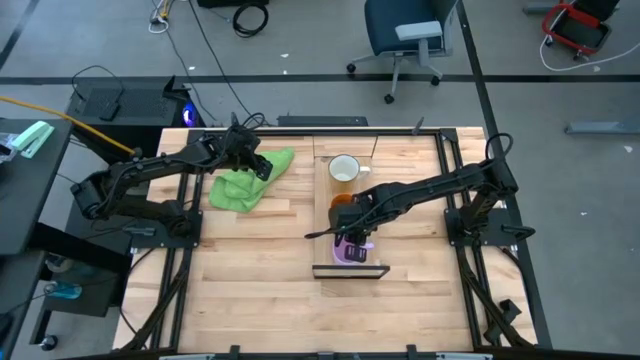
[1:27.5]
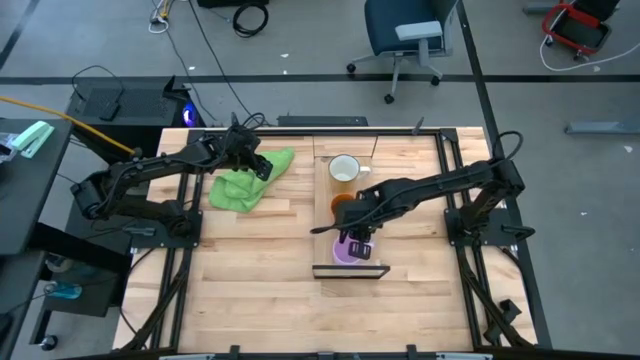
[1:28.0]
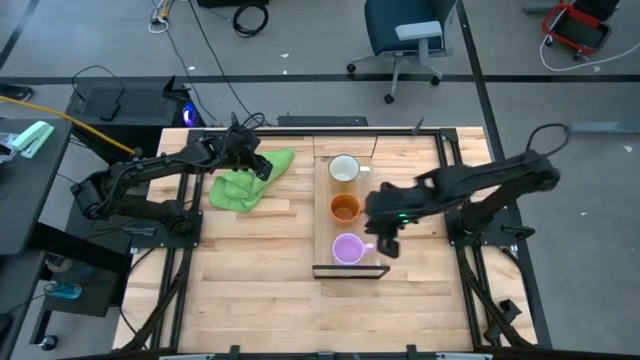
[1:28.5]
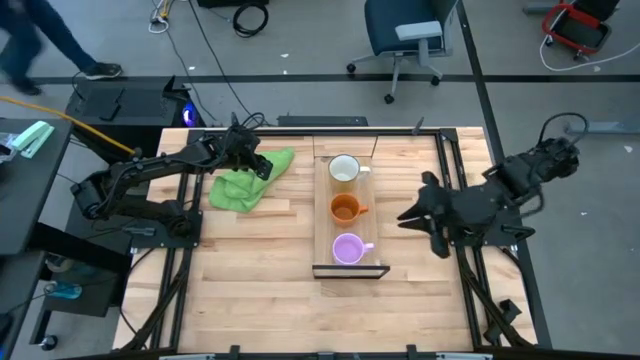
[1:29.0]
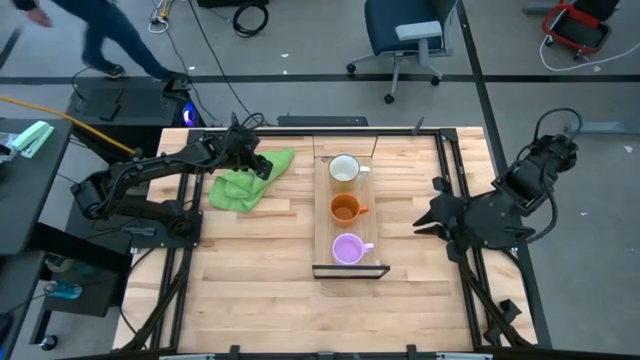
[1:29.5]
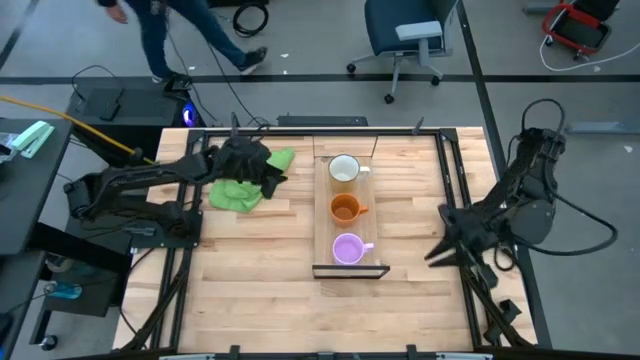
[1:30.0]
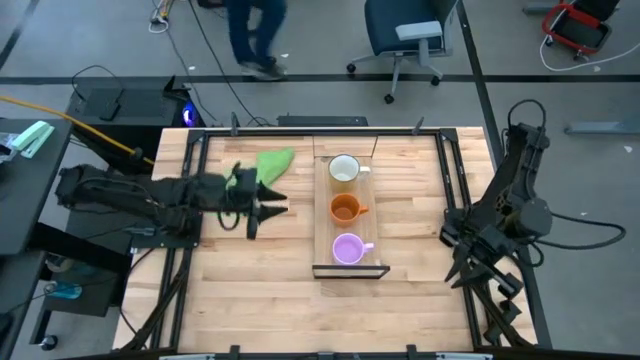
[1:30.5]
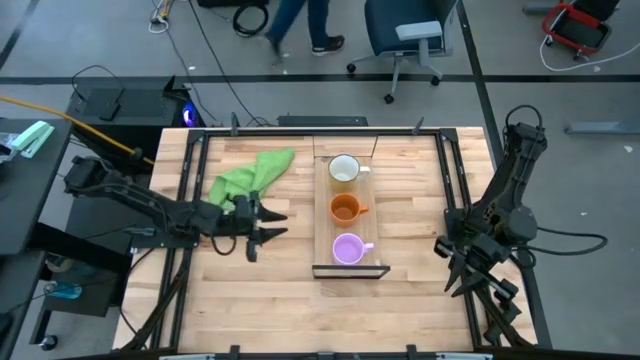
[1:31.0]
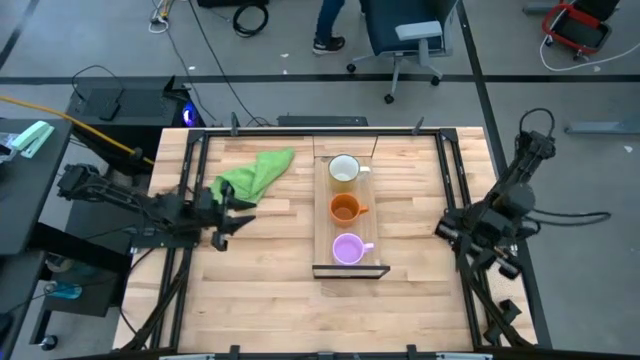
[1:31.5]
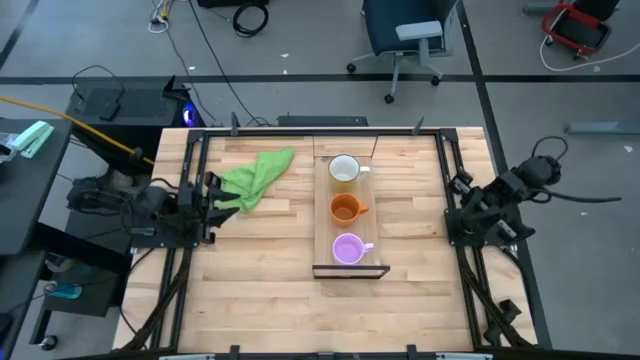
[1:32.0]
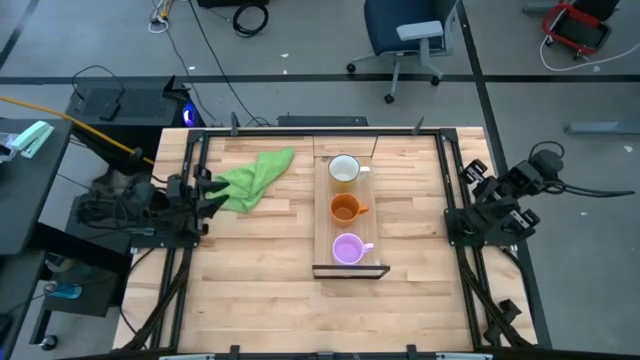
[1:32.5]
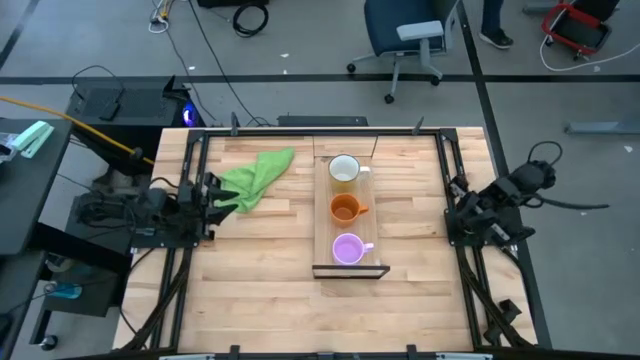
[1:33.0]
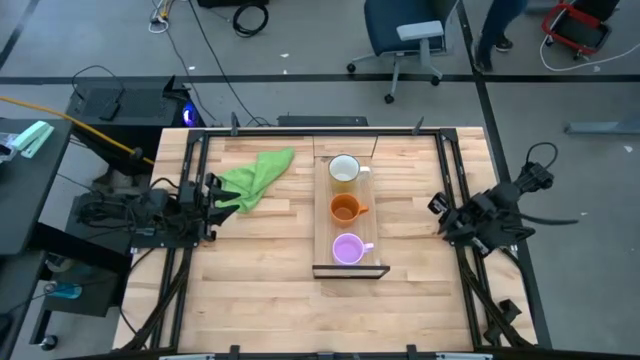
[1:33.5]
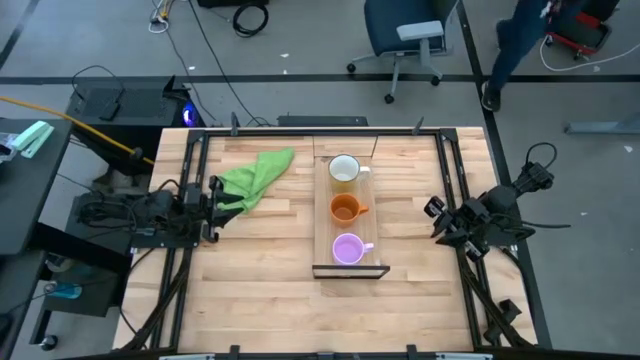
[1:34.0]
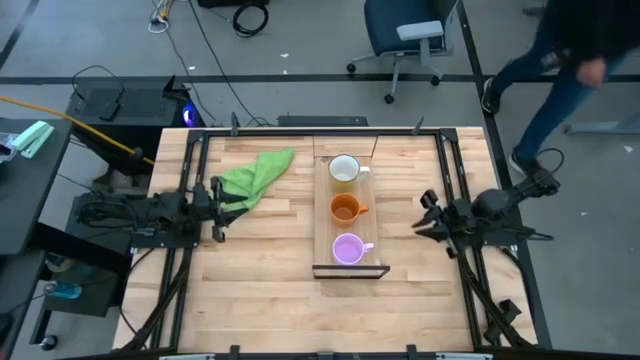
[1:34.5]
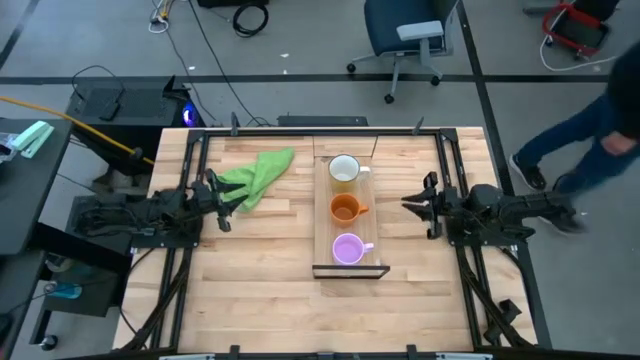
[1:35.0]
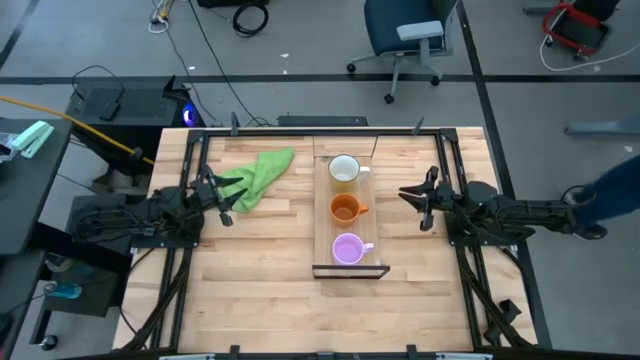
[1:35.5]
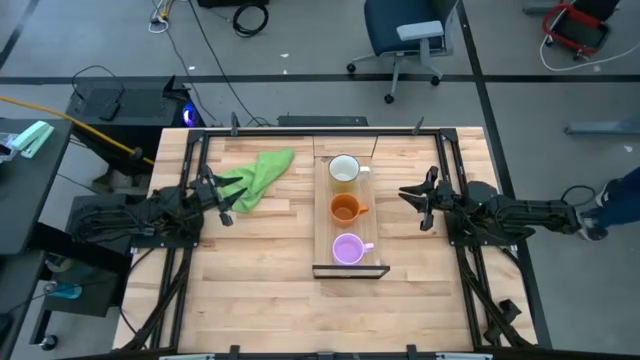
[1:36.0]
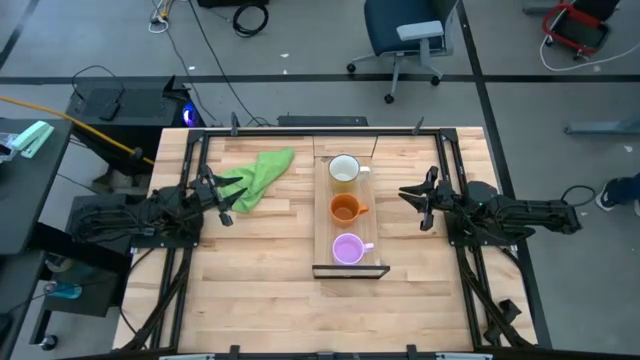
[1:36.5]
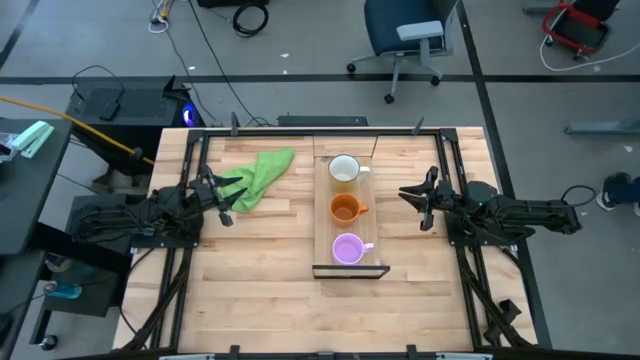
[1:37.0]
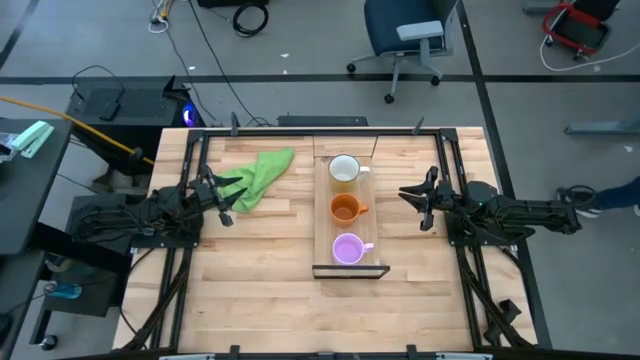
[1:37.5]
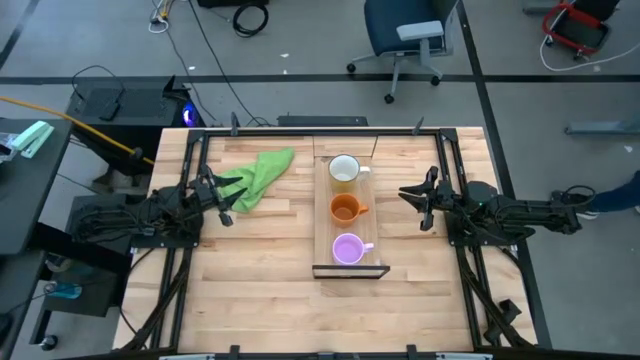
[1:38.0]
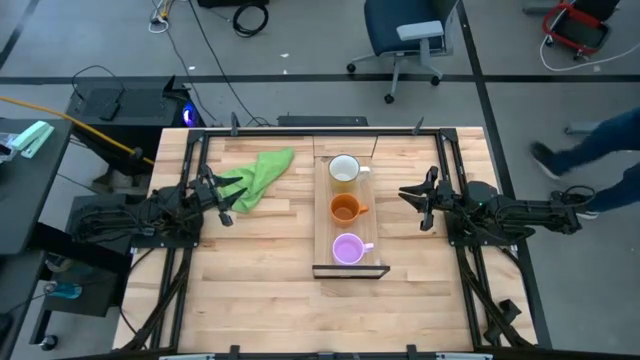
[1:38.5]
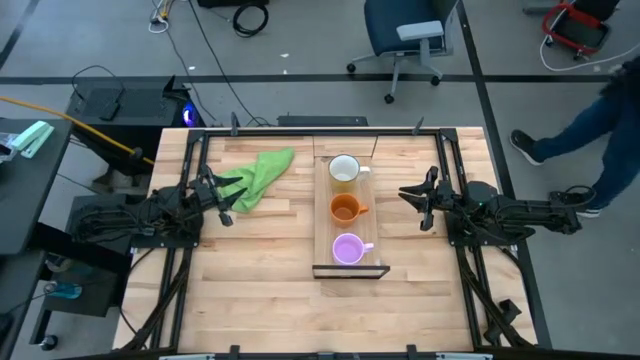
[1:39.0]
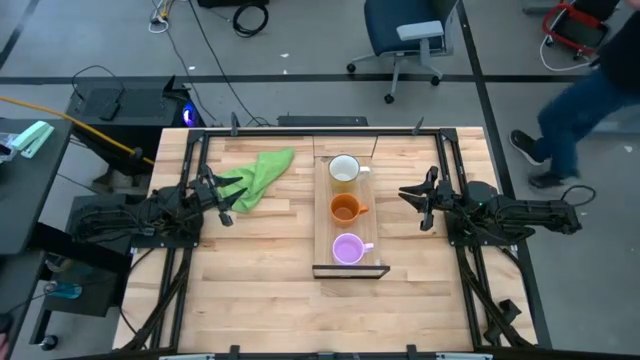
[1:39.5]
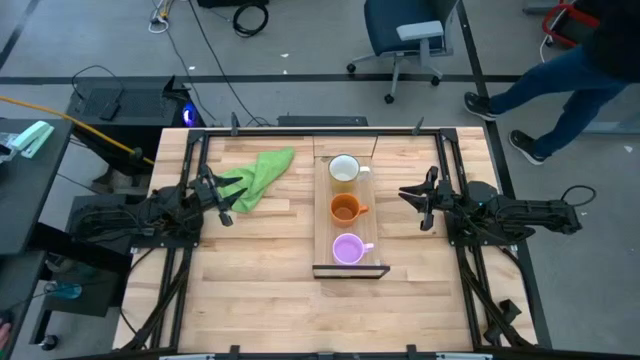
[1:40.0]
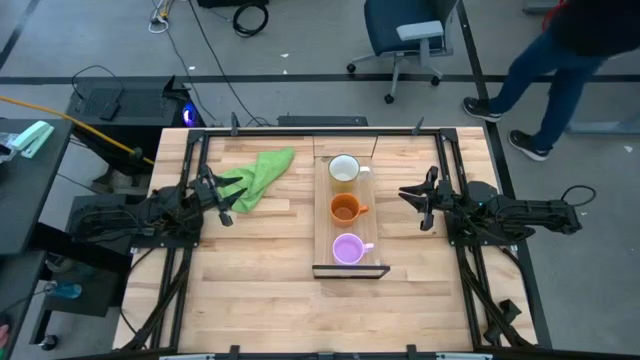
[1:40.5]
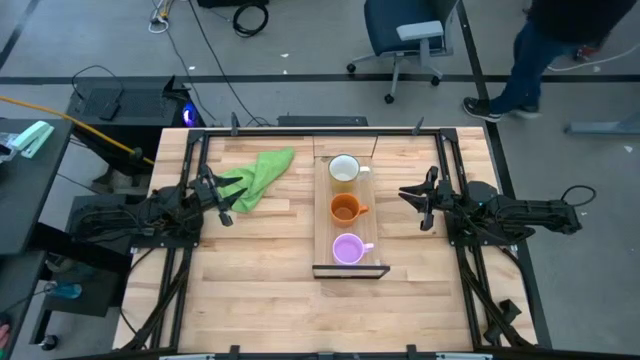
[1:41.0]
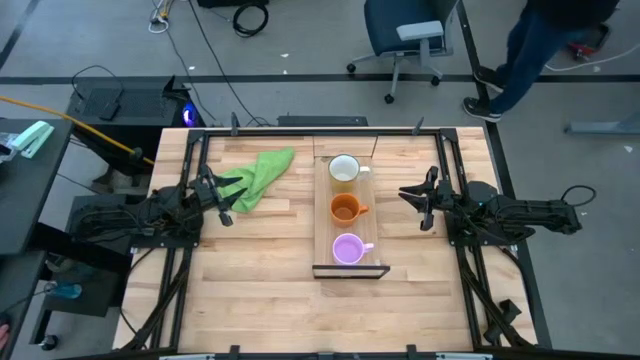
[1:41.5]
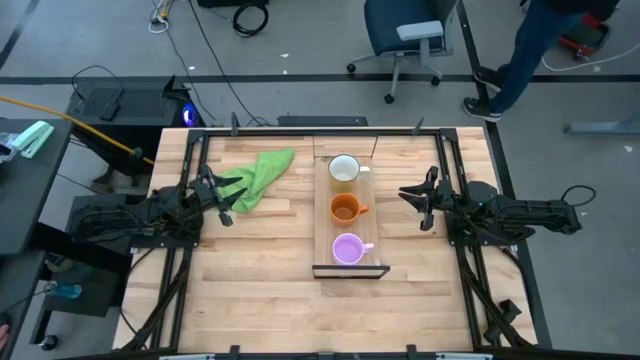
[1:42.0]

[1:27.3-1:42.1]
Task: Stack small to large cups/mugs on shelf
Return to Home Position

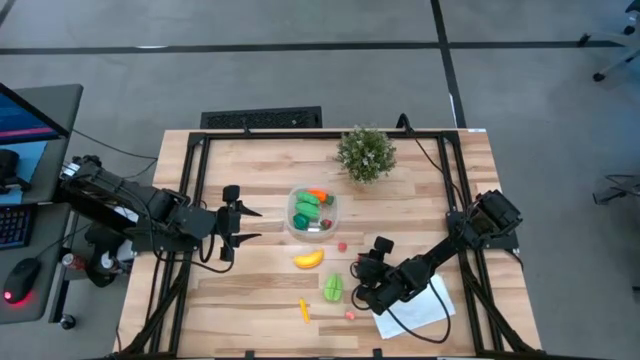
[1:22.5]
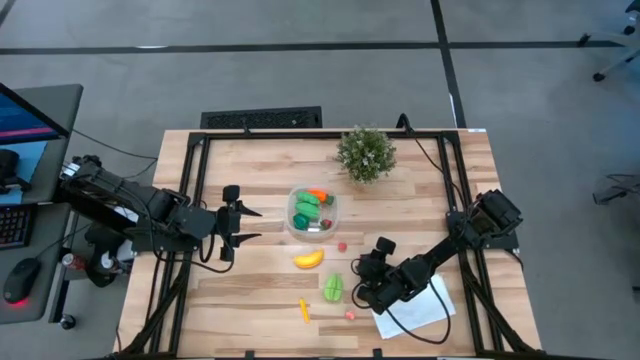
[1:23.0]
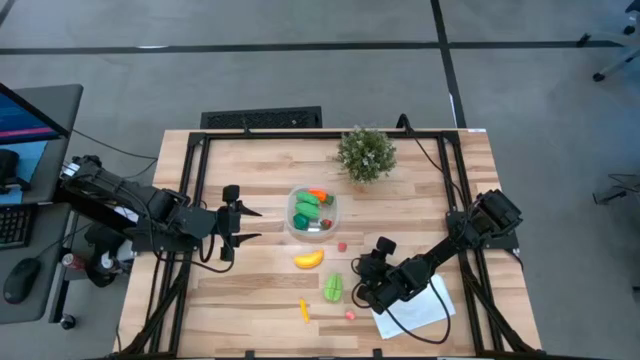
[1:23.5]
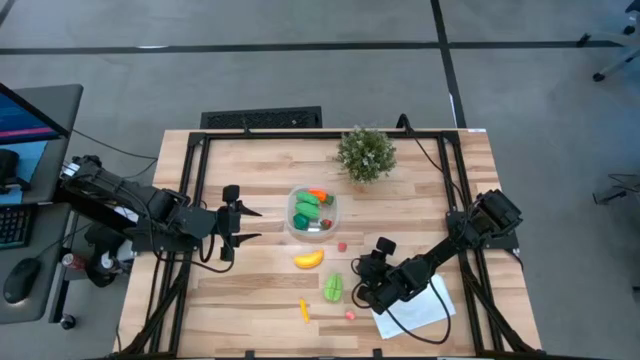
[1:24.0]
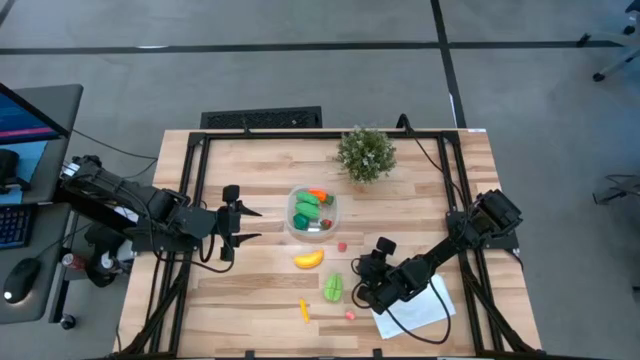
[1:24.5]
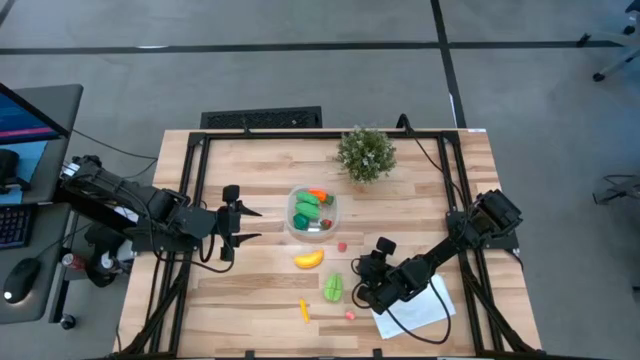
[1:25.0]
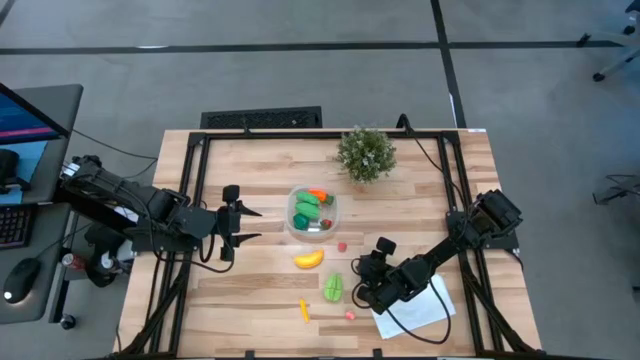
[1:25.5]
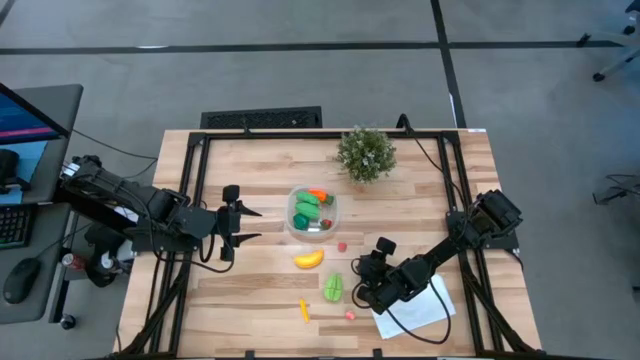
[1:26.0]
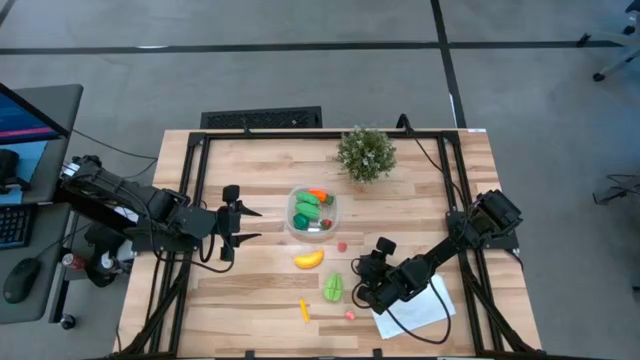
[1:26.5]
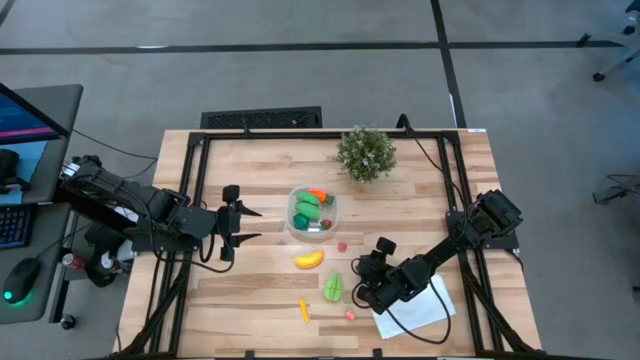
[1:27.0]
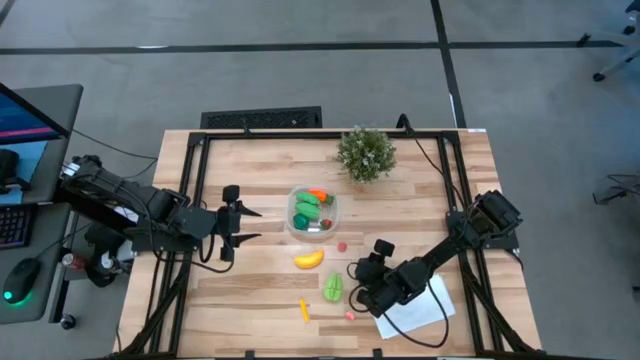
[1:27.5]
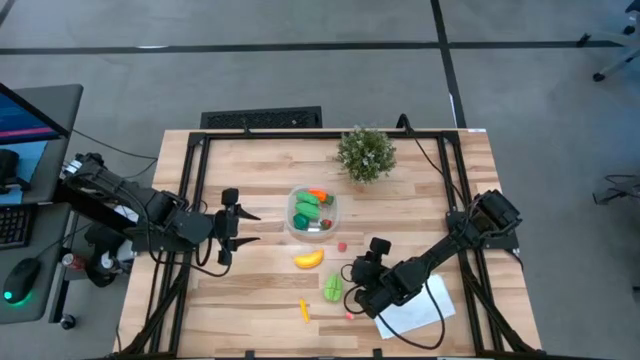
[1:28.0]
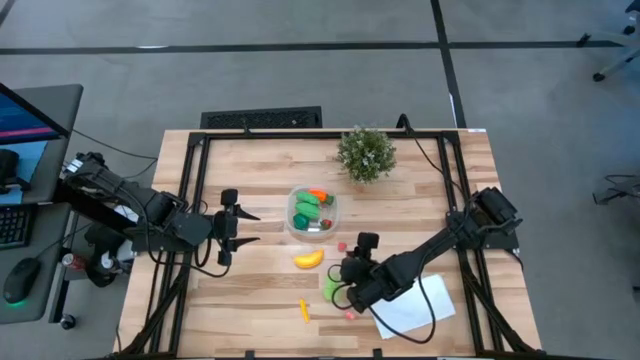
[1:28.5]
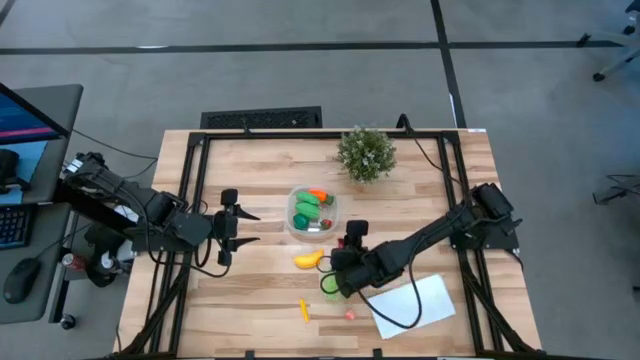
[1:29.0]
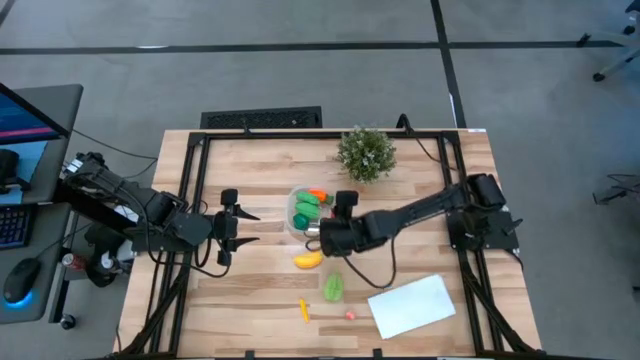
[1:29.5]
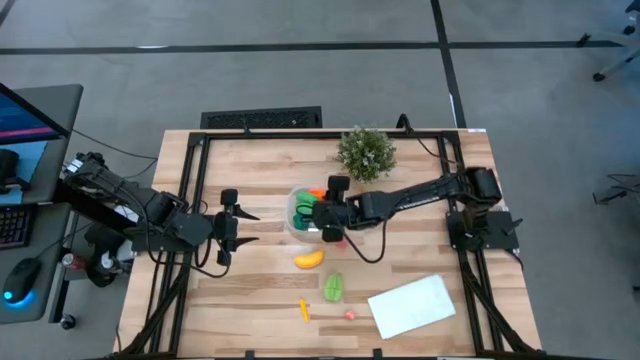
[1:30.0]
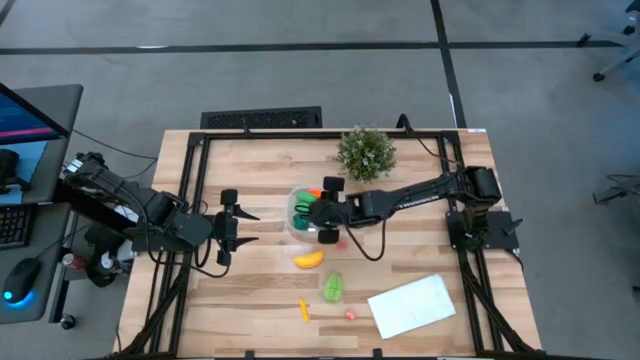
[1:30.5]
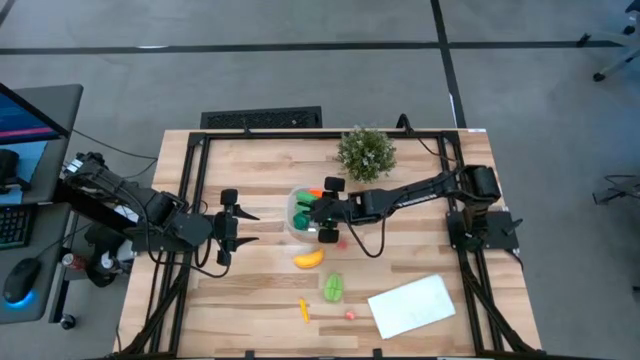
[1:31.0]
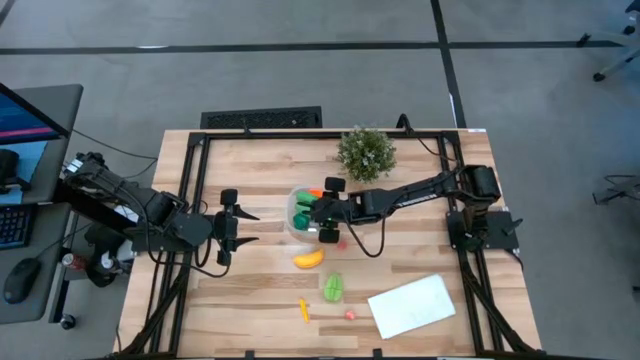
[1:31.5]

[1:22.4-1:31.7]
Task: Pick and placing Produce into tupperware
Put the red strawberry into the transparent container
